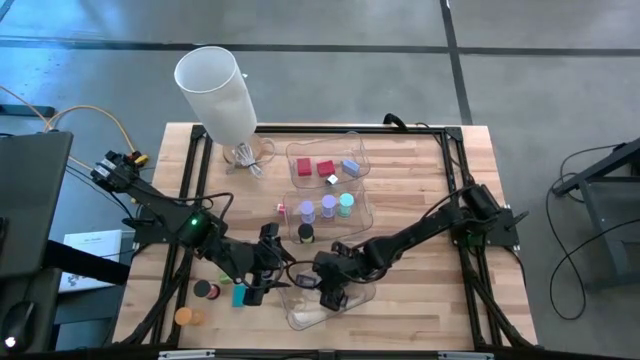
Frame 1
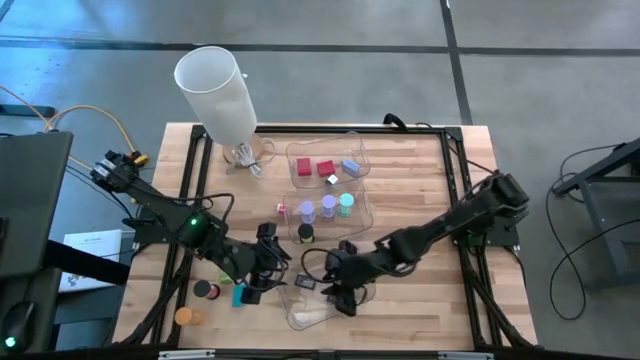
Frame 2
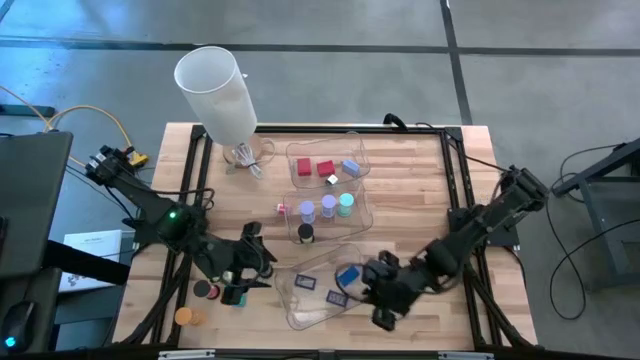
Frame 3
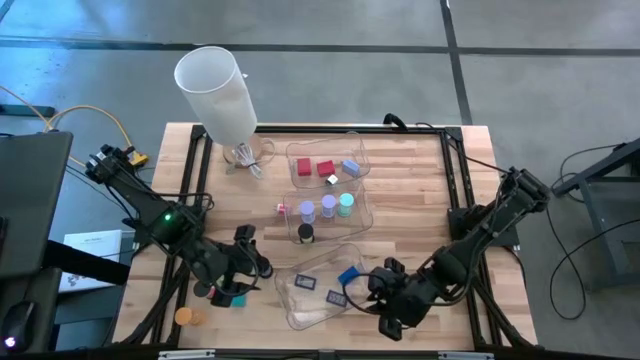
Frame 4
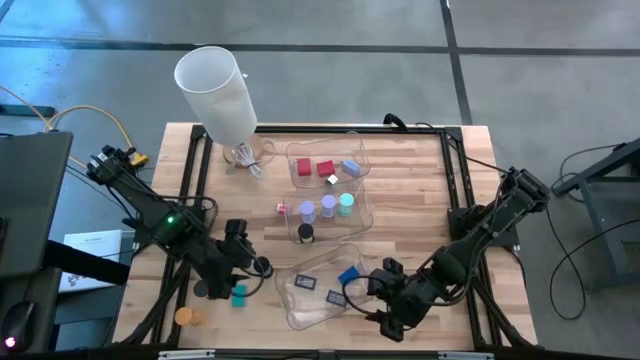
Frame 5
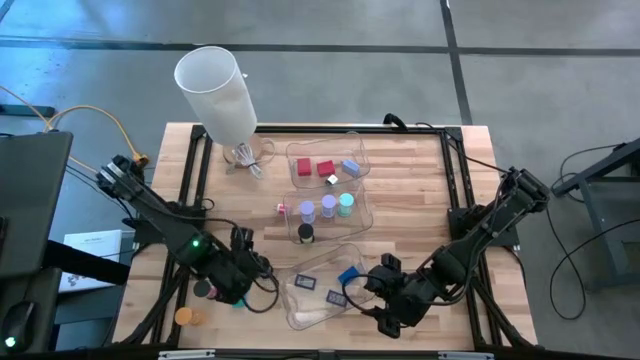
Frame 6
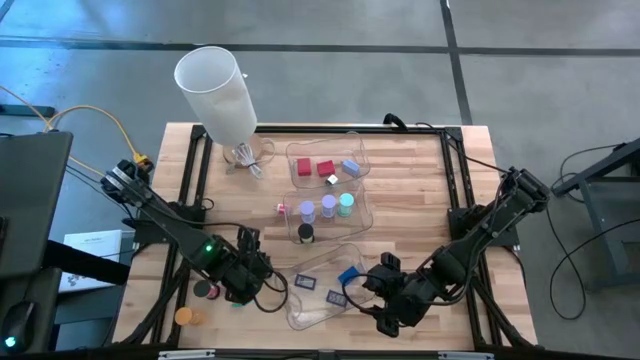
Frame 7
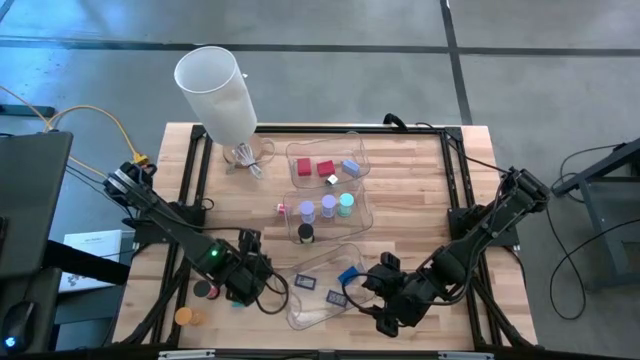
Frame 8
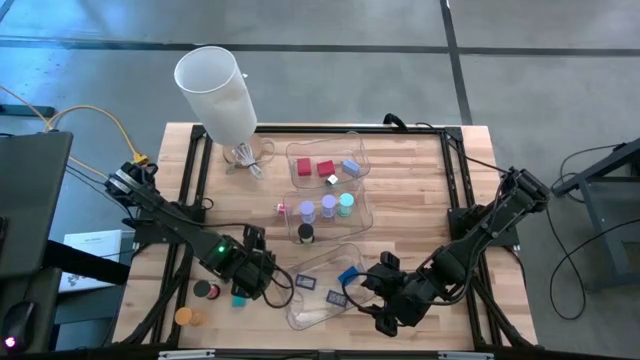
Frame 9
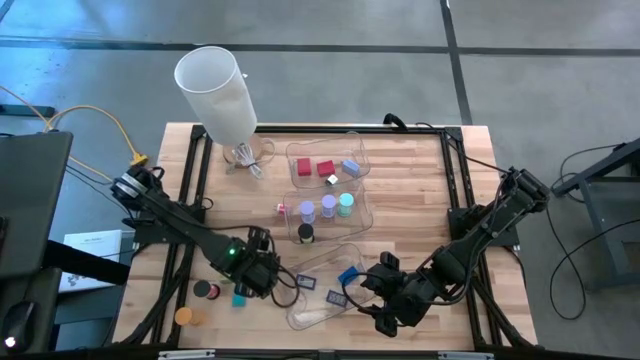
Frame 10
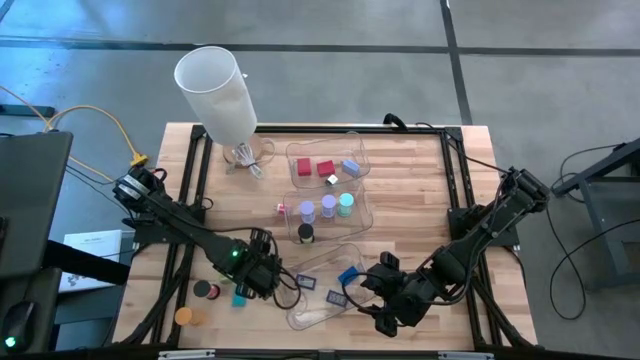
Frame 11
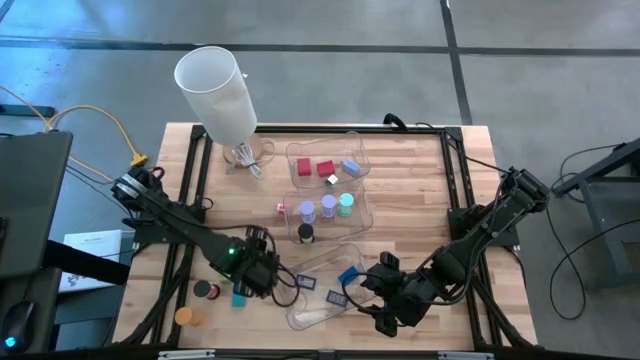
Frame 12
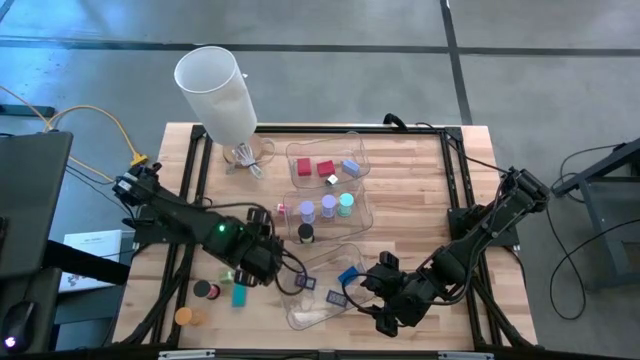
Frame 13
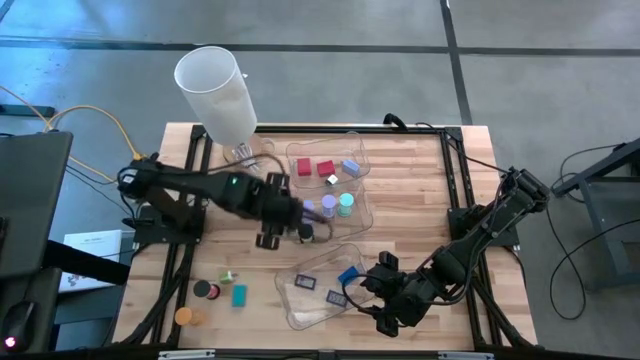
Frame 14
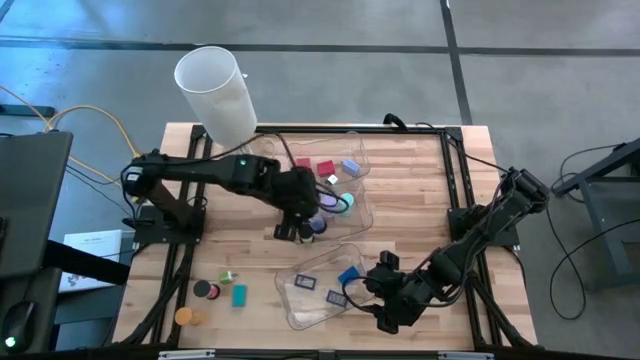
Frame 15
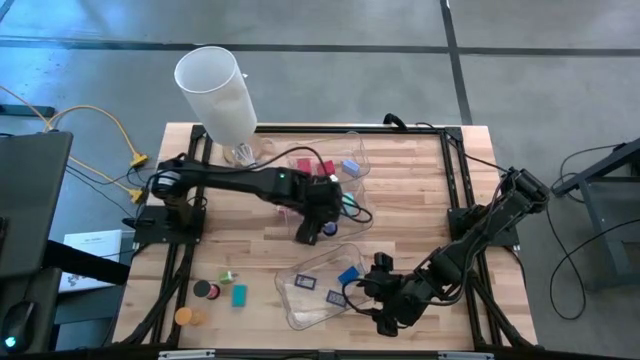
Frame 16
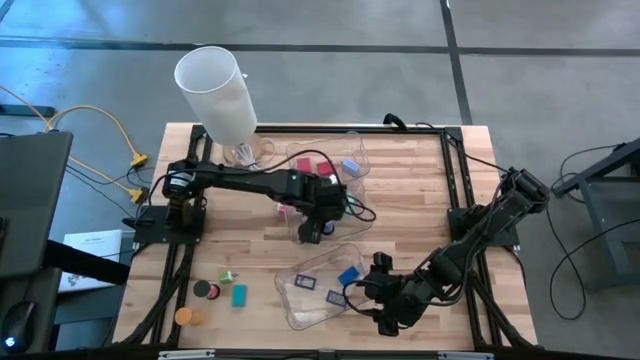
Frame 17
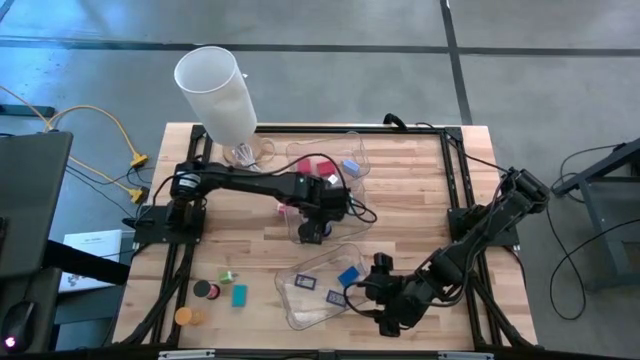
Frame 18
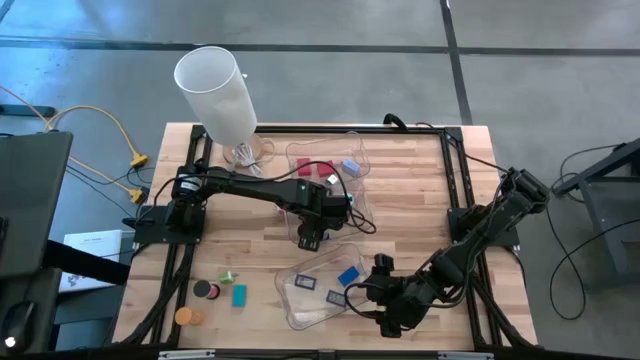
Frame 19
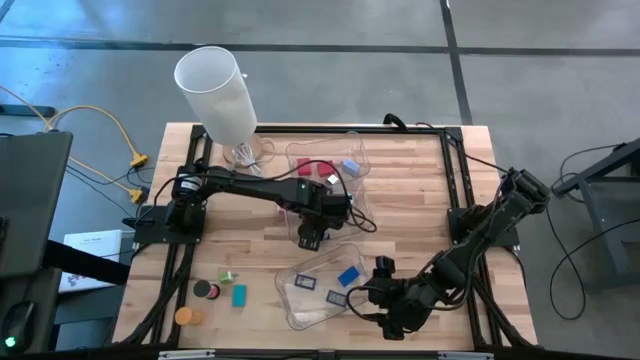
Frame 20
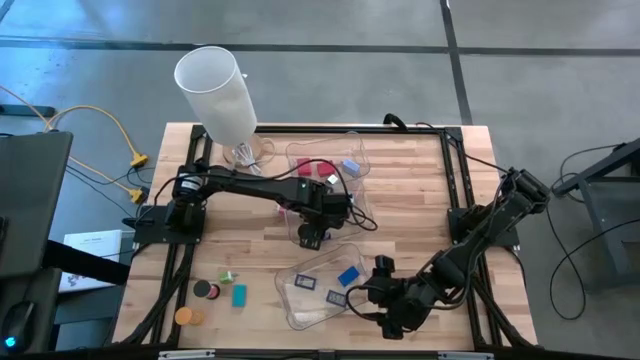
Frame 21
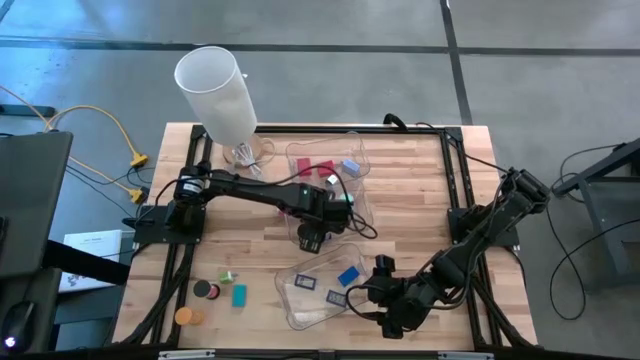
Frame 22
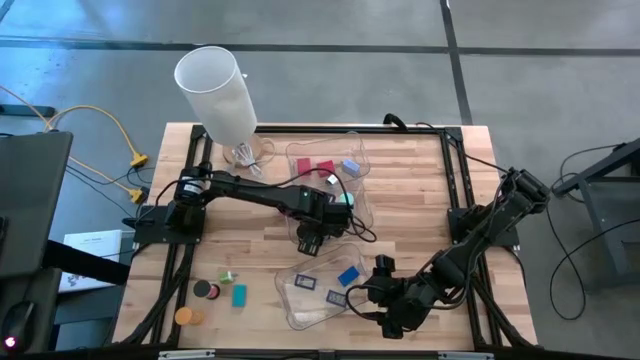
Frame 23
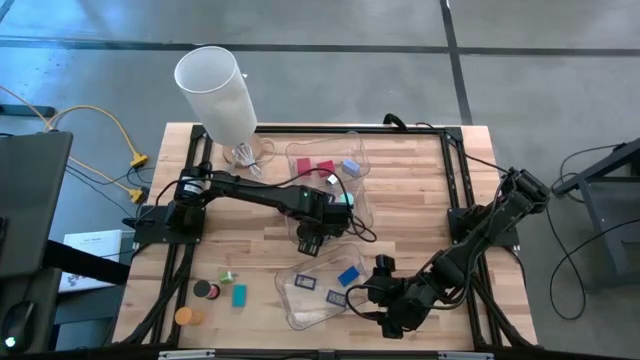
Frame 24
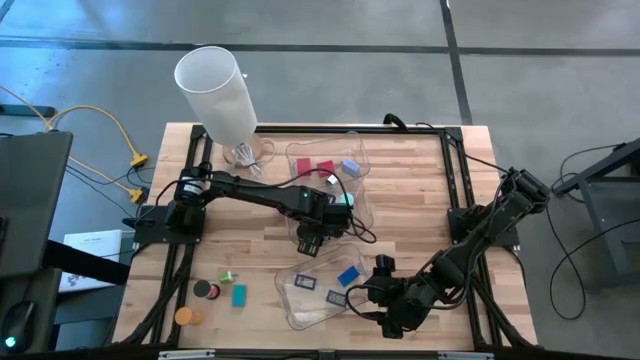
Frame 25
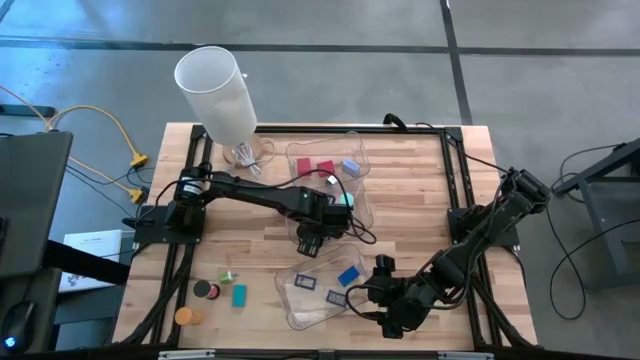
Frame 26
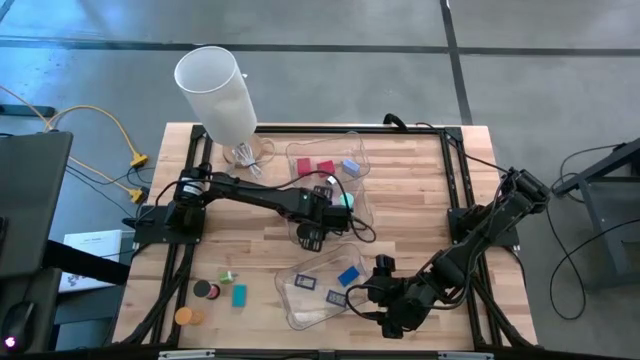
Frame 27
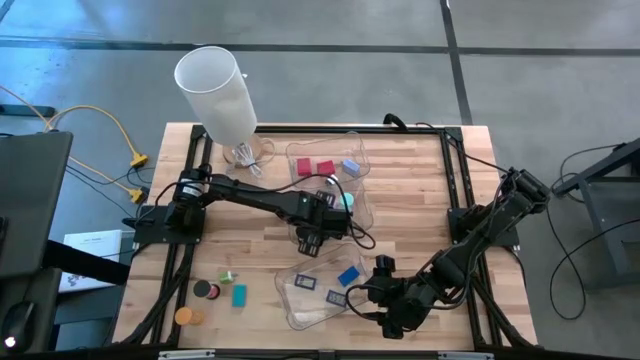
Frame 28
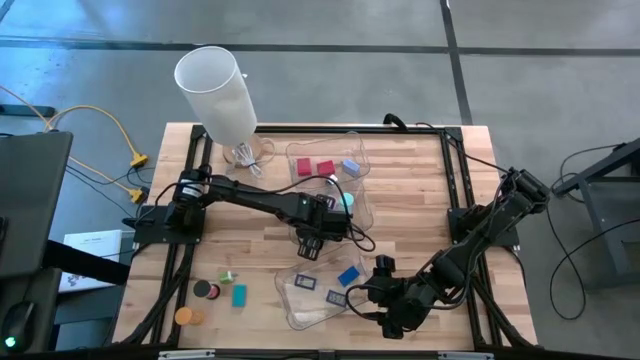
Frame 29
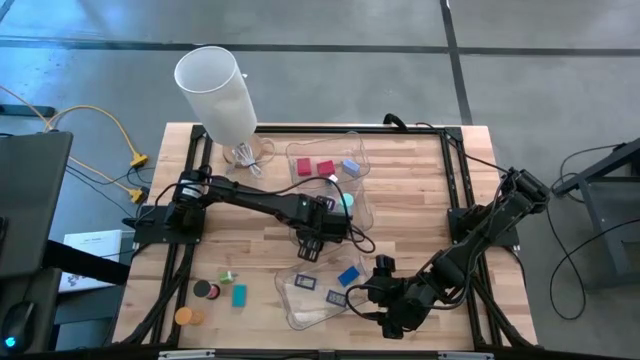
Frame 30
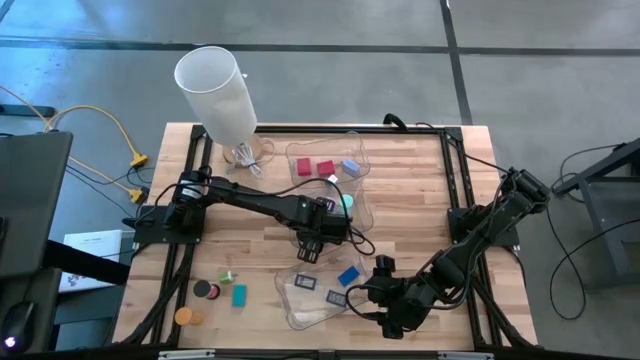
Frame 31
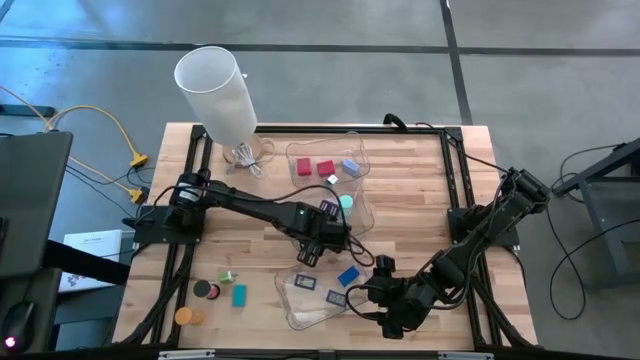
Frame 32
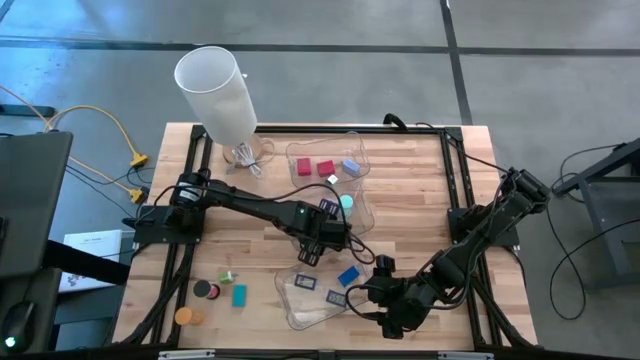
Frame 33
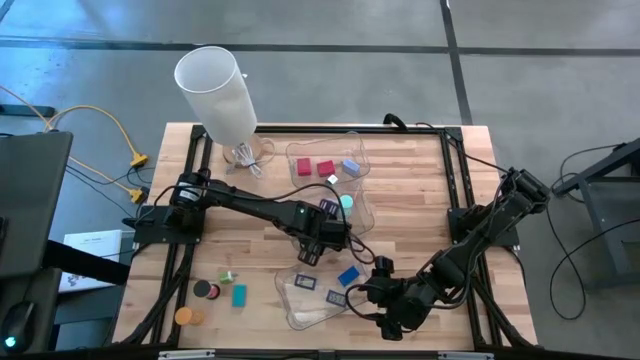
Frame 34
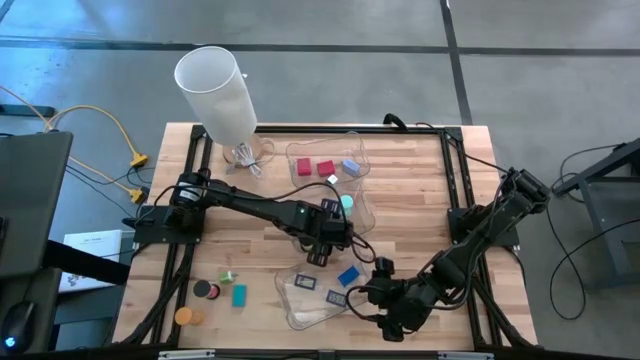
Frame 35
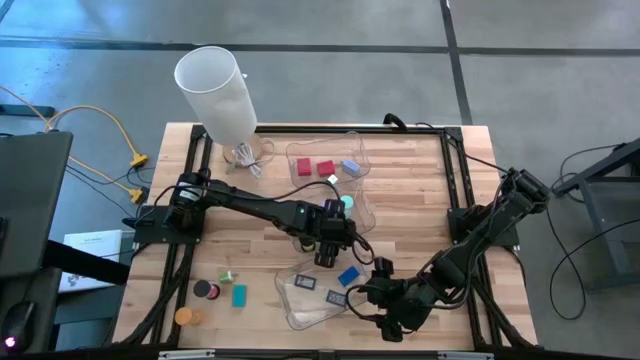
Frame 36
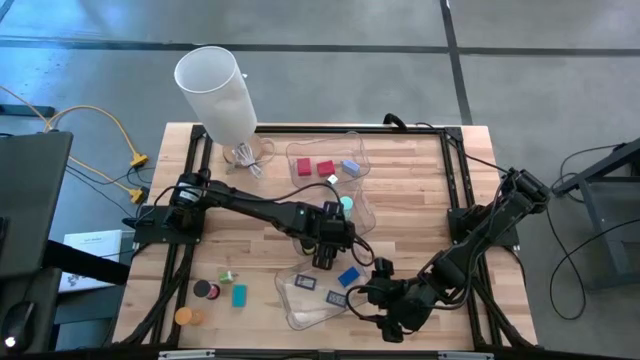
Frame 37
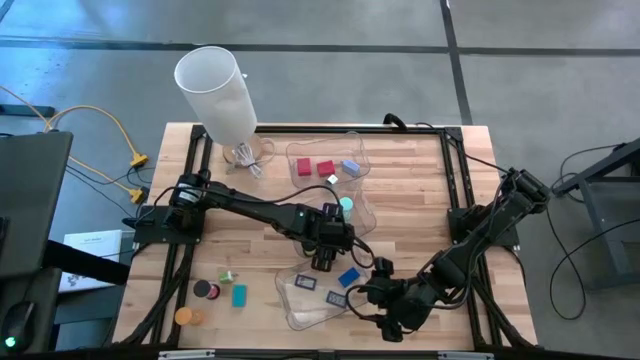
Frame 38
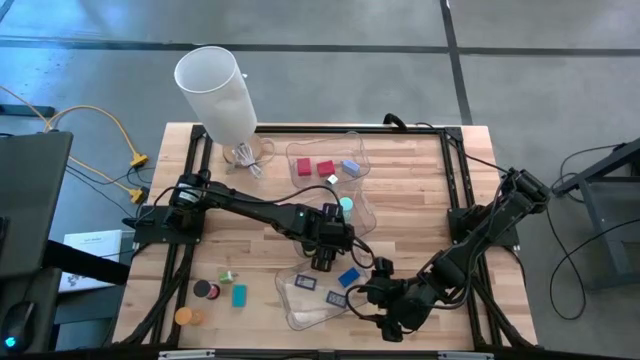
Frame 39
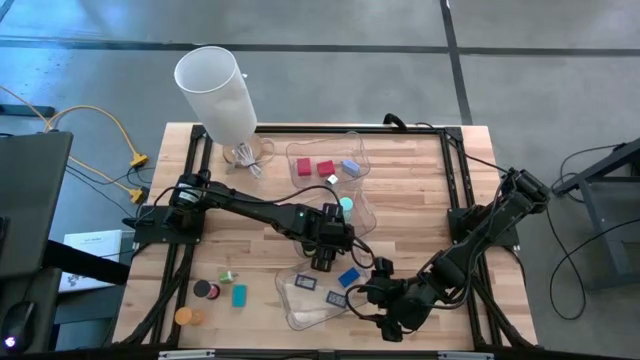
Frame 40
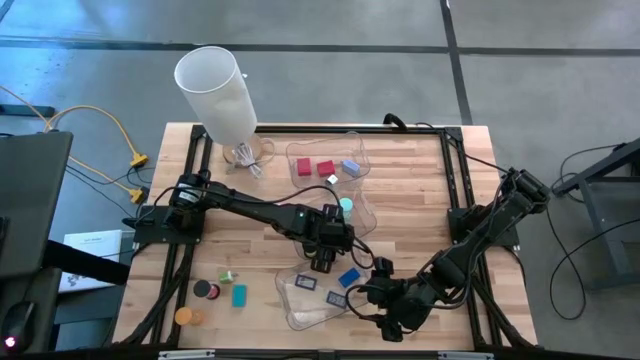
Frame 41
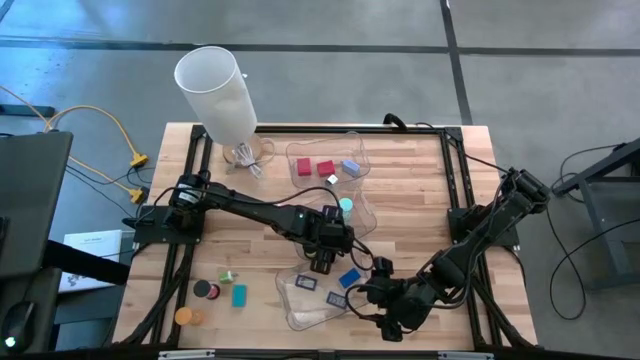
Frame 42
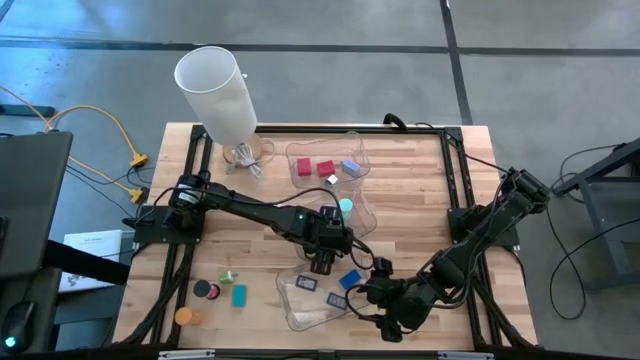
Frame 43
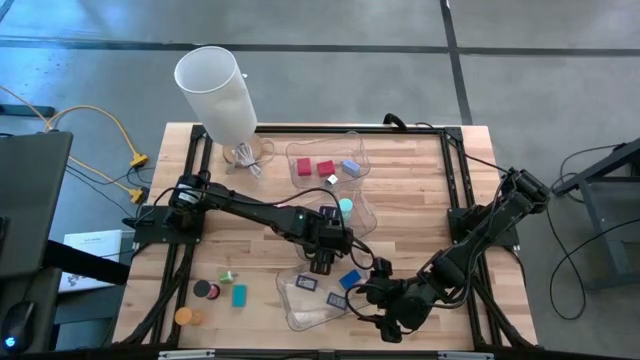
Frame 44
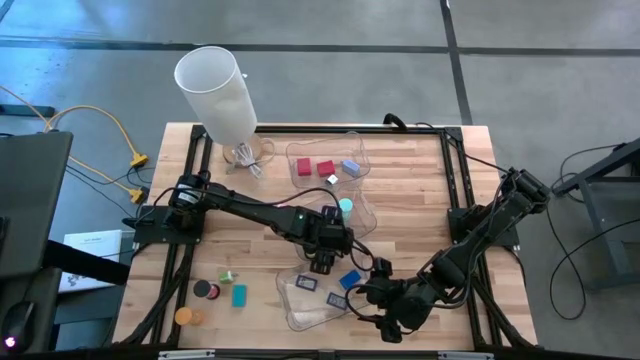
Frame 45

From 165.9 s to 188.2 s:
Task: Pick & Place Office items
Put the dark blue hourglass into the middle transparent bin
